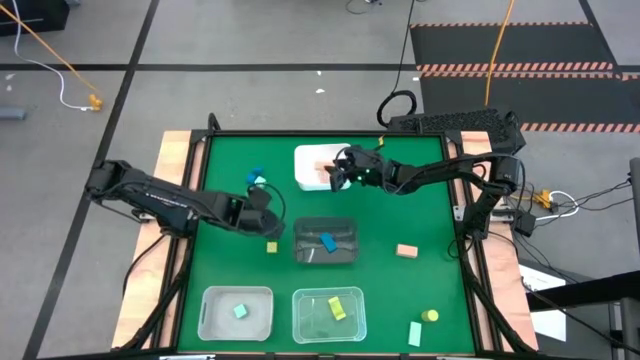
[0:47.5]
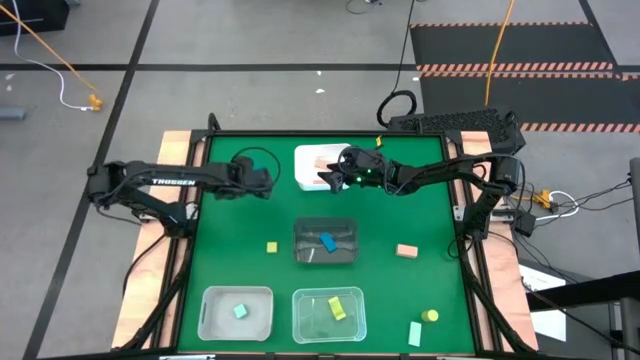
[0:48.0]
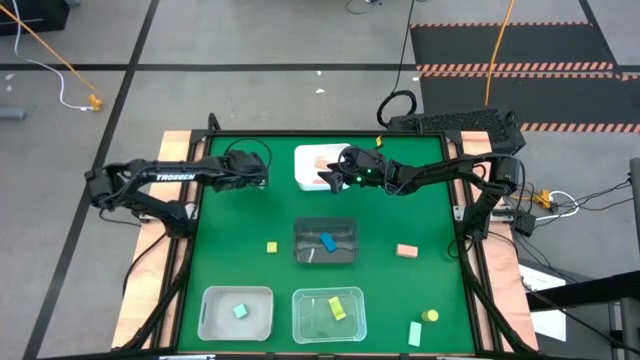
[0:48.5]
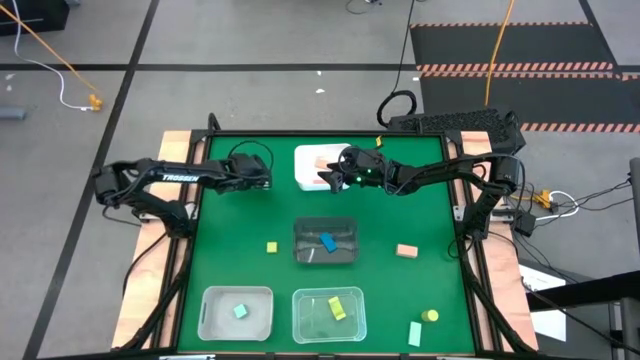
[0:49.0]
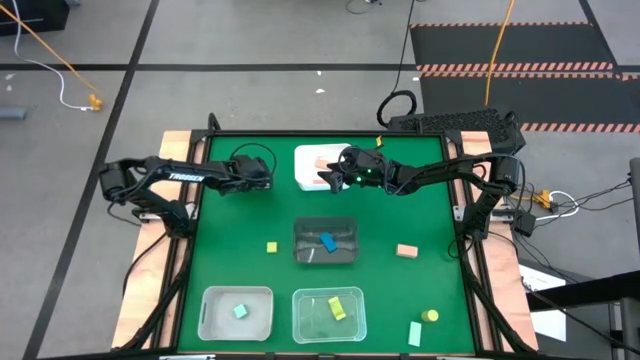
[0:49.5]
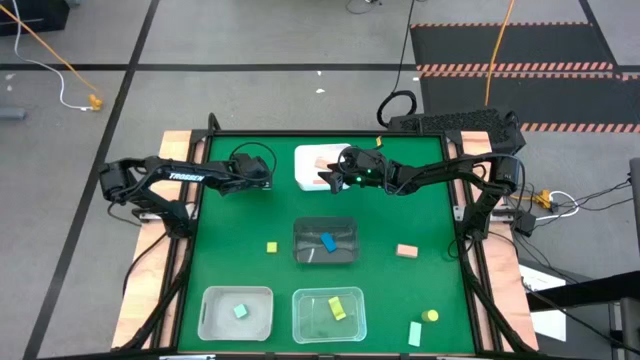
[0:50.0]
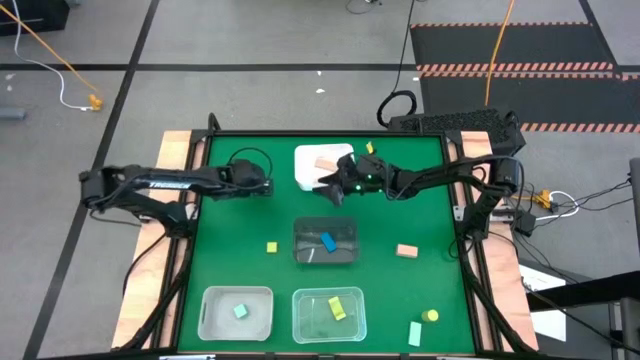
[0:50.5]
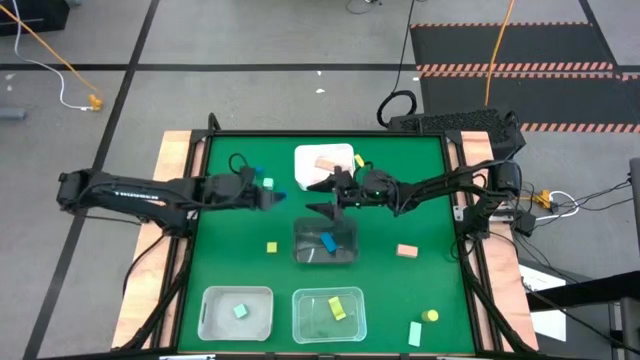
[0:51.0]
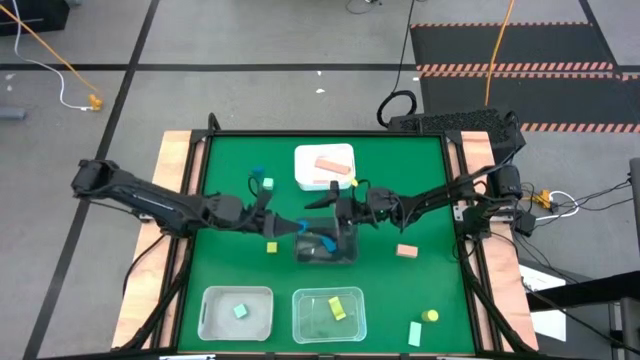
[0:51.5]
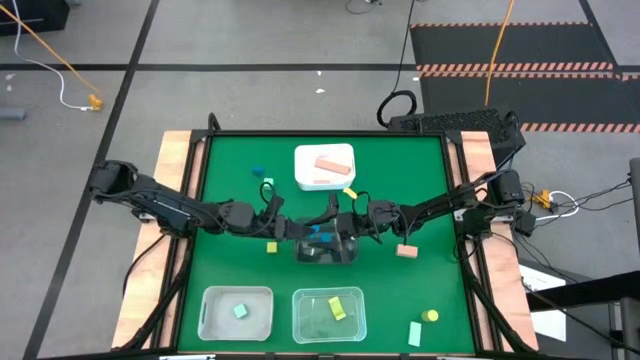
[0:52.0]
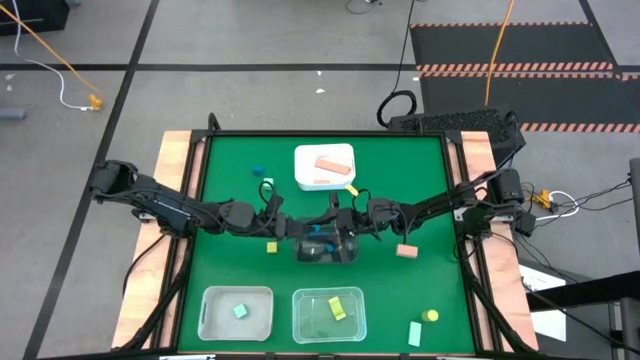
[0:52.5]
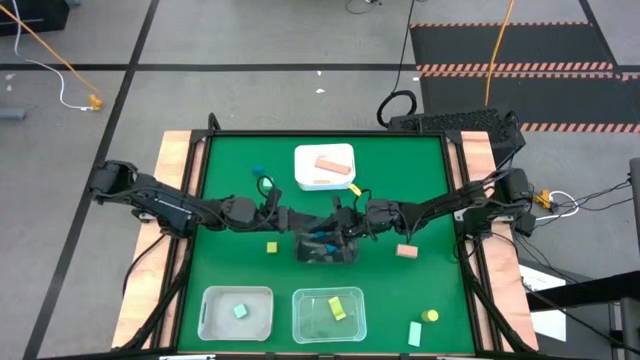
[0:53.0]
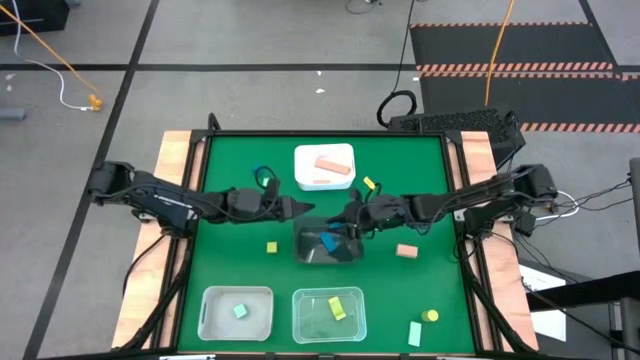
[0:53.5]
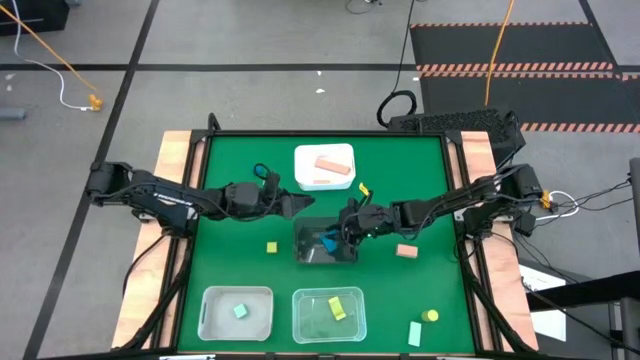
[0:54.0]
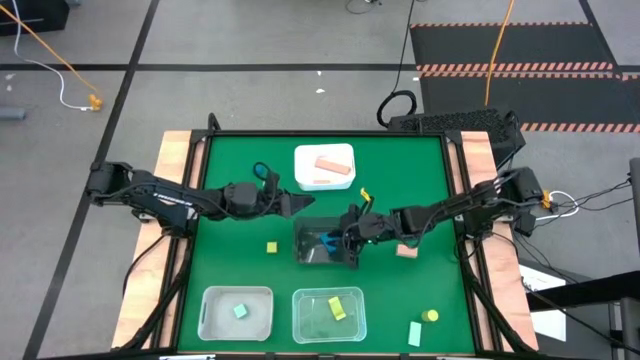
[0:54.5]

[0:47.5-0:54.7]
Task: Sort & place blocks by color
Put the bottom blue block into the black bin

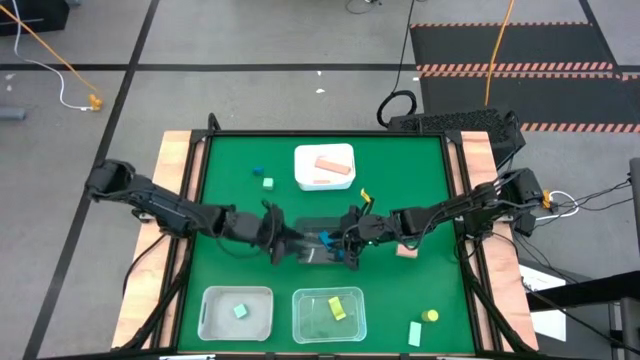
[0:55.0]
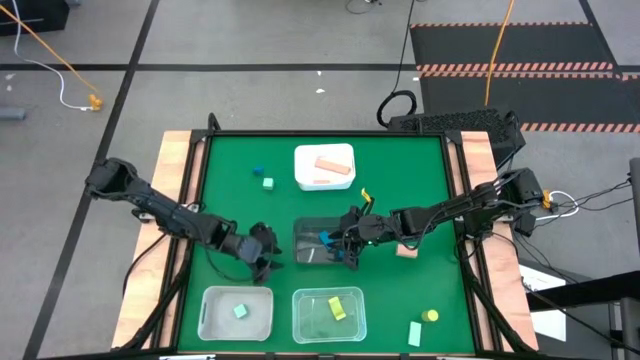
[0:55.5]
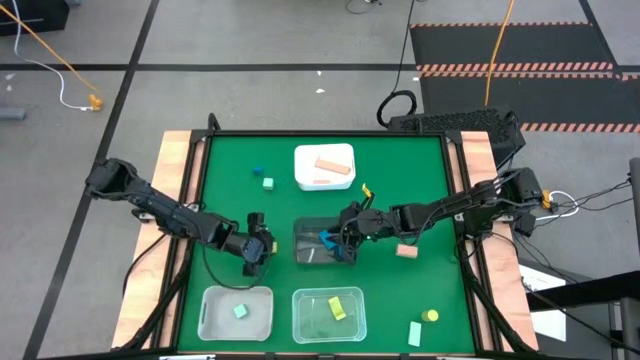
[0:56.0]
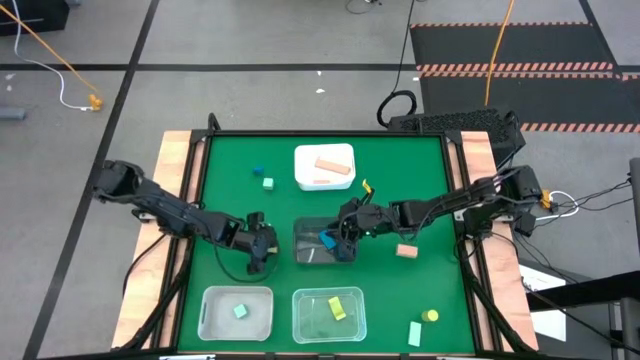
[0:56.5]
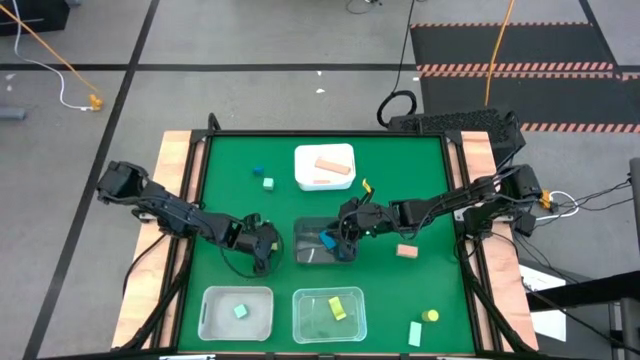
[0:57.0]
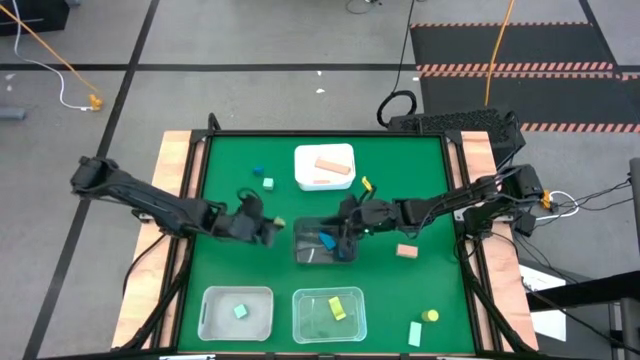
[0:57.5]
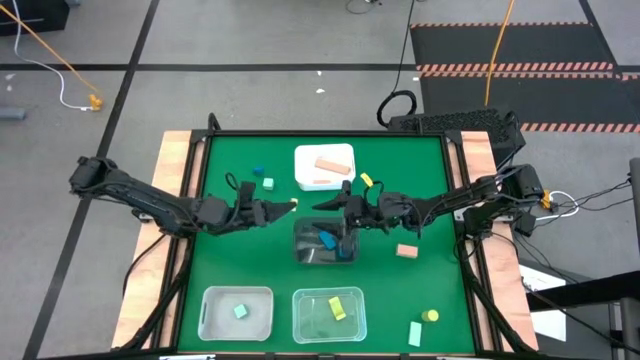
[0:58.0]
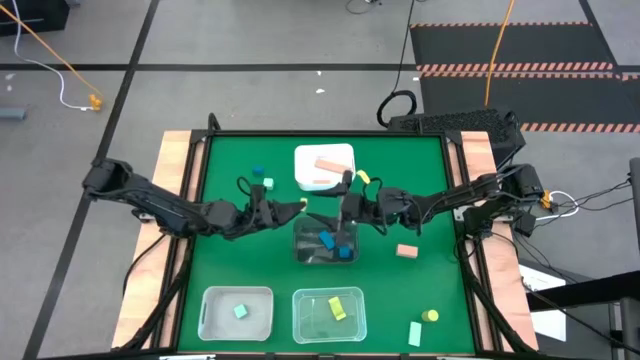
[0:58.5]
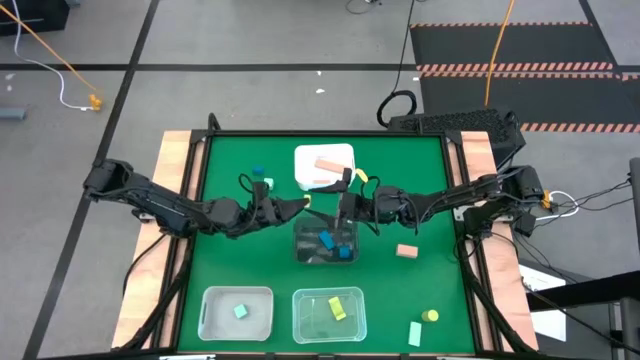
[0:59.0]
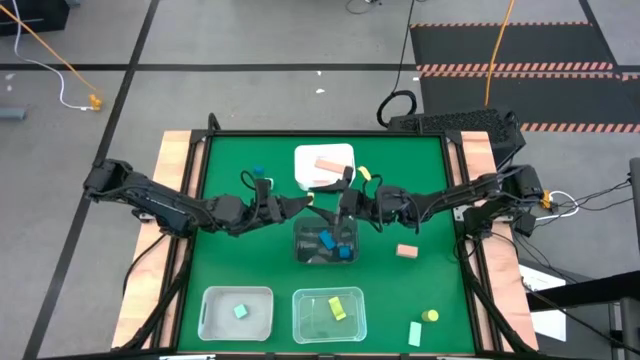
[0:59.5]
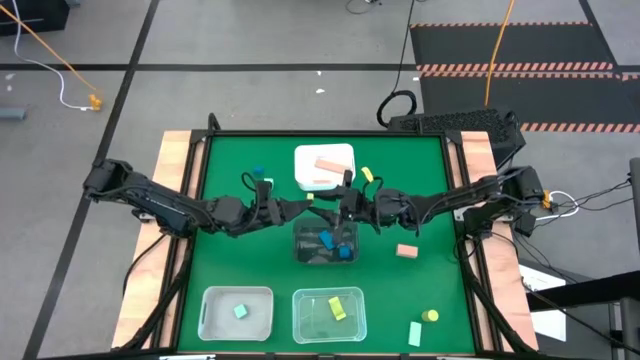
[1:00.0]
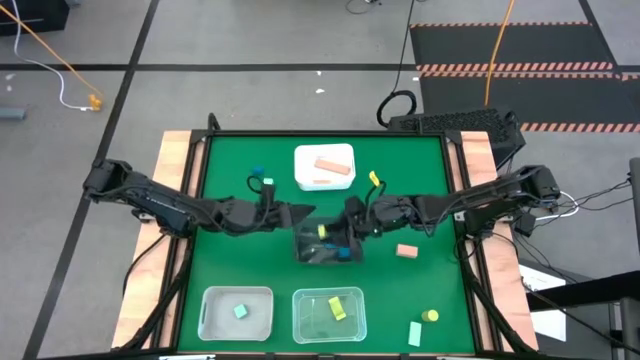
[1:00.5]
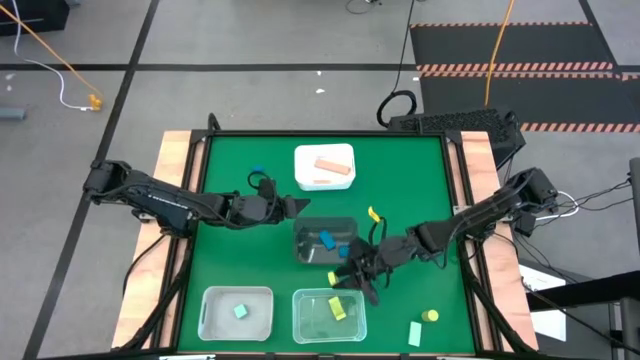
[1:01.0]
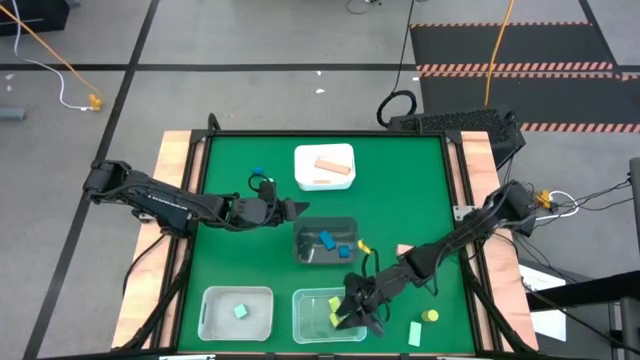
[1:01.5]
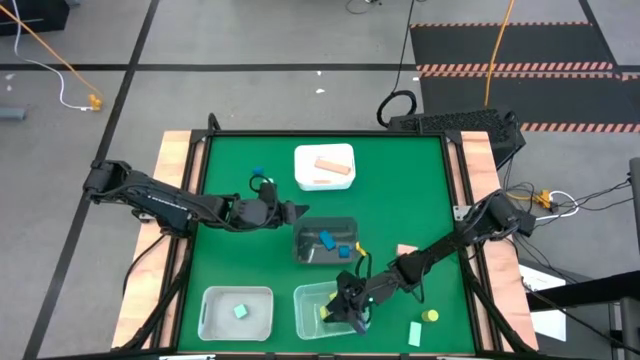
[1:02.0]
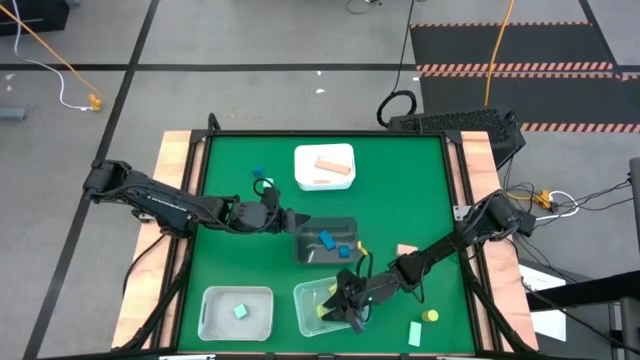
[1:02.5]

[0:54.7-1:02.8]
Put the top green block into the transparent bin

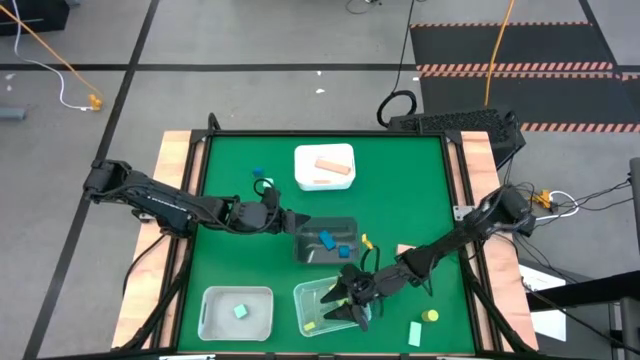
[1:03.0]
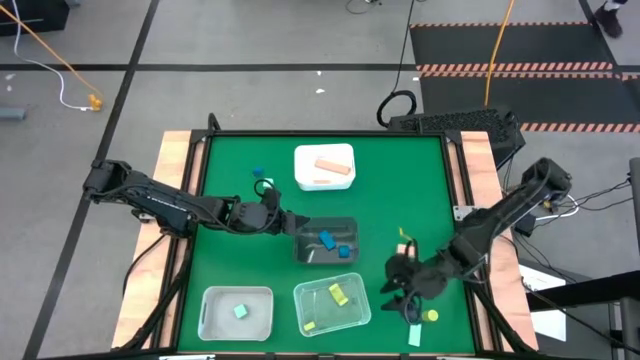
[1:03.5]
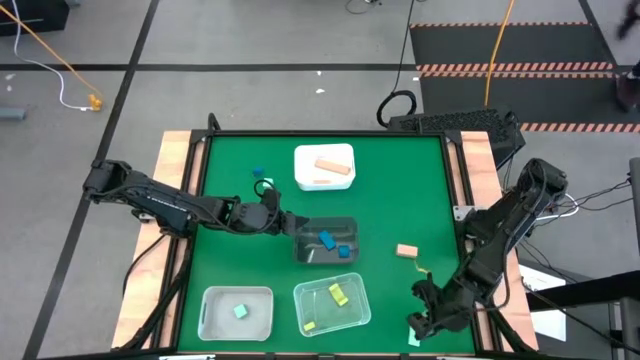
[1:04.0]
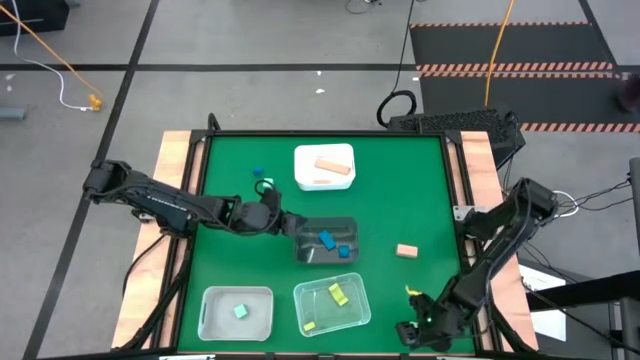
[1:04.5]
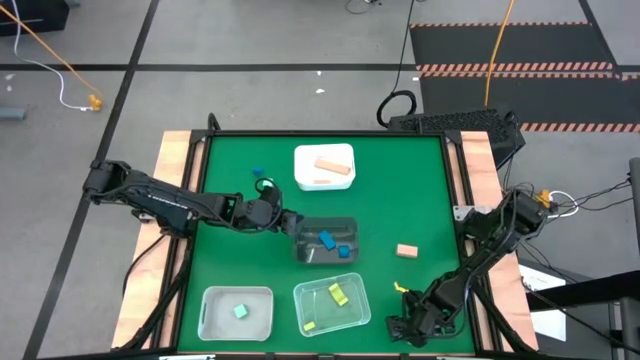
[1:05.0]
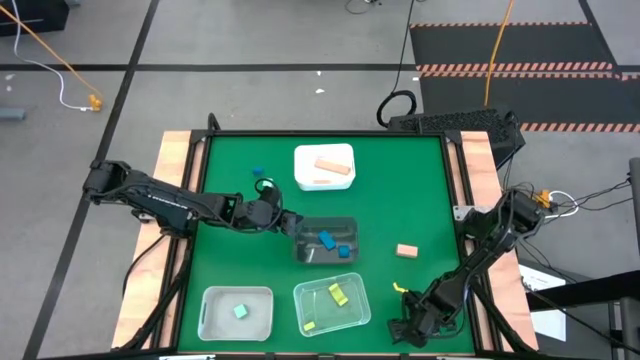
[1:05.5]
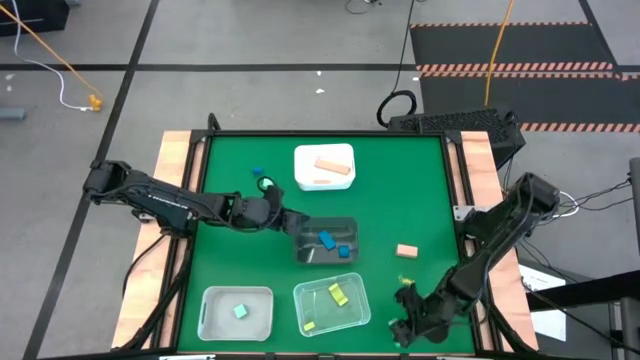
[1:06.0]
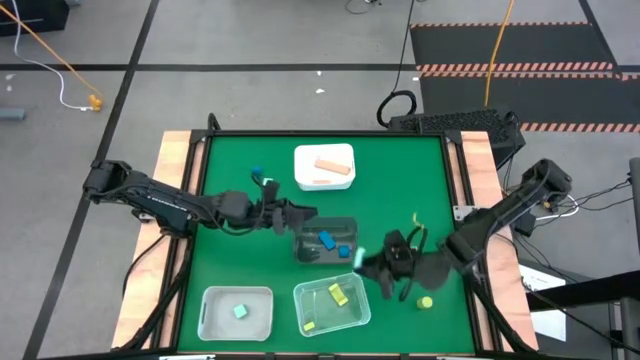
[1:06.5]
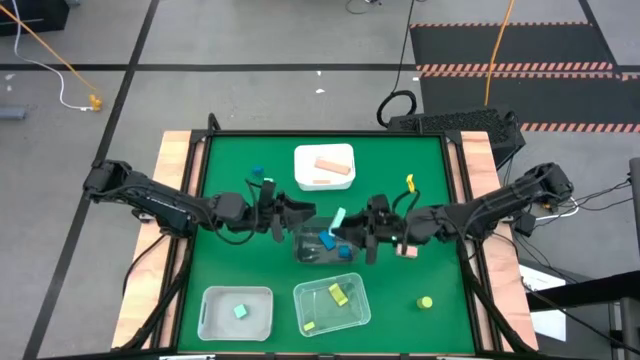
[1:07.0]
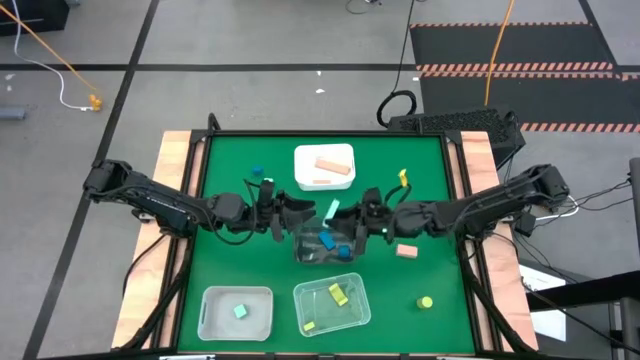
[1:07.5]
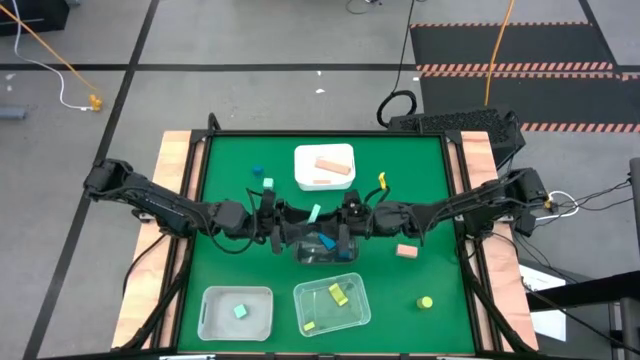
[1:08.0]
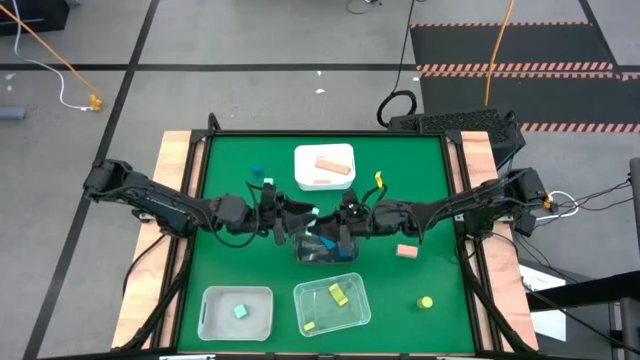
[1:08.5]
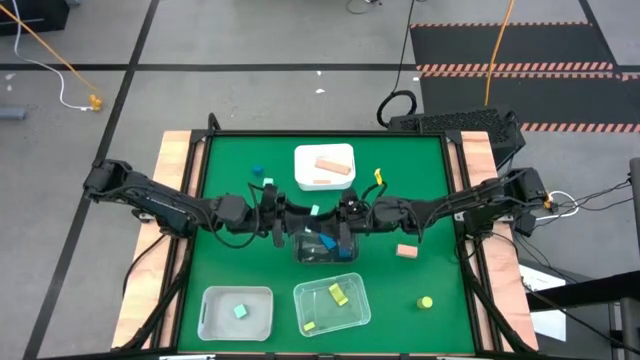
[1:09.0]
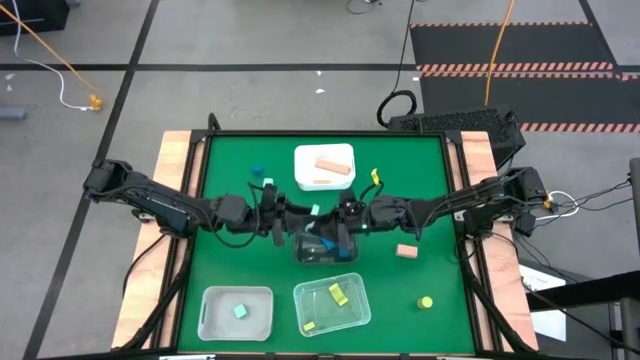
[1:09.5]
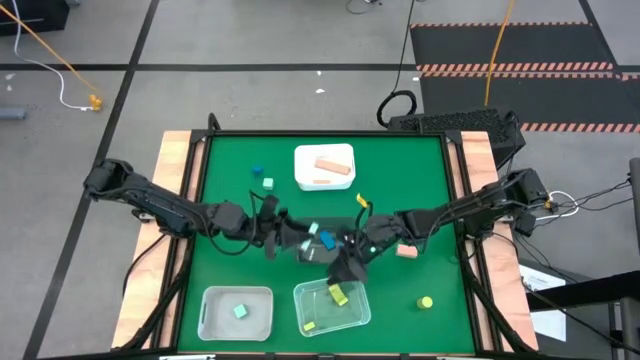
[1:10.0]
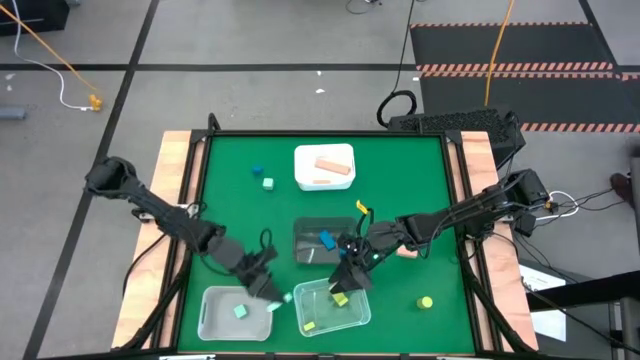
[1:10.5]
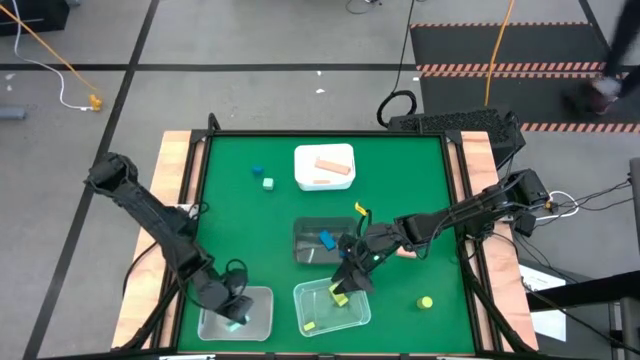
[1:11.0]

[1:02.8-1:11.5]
Put the bottom light blue block into the gray bin
